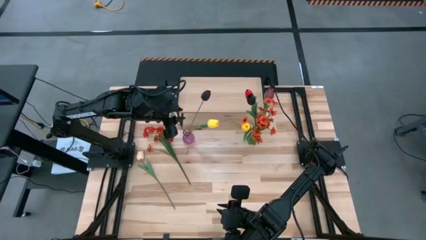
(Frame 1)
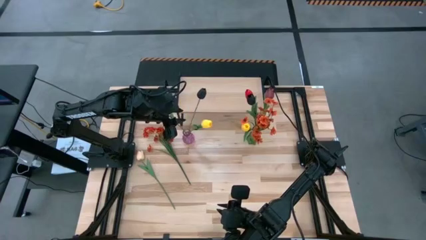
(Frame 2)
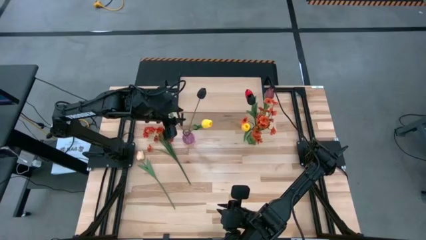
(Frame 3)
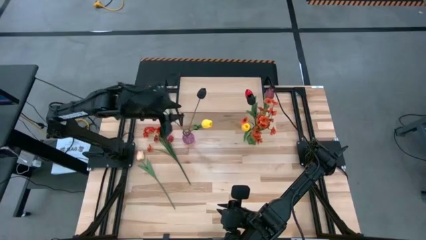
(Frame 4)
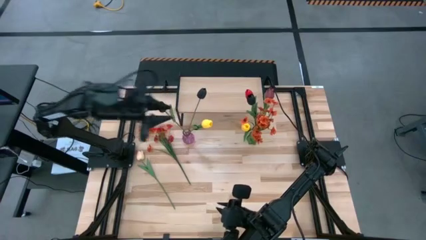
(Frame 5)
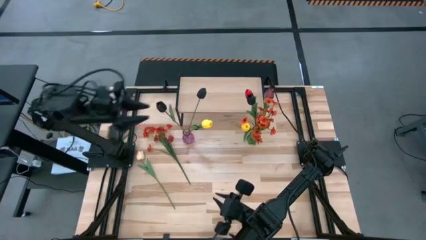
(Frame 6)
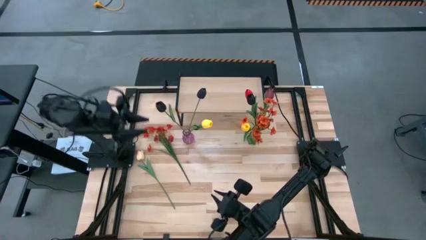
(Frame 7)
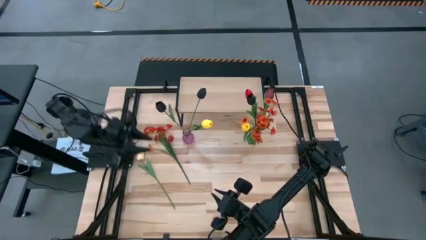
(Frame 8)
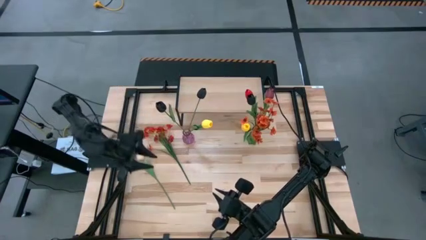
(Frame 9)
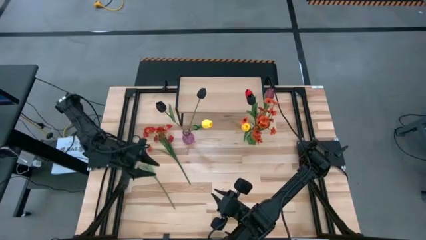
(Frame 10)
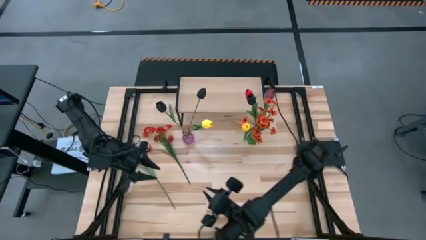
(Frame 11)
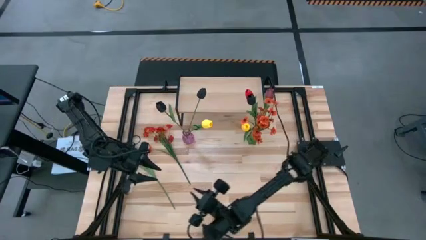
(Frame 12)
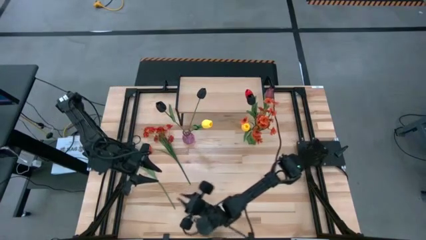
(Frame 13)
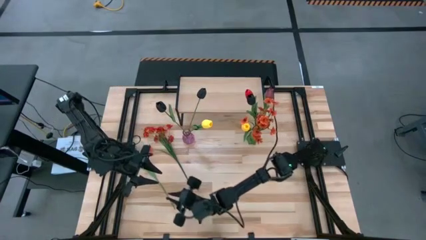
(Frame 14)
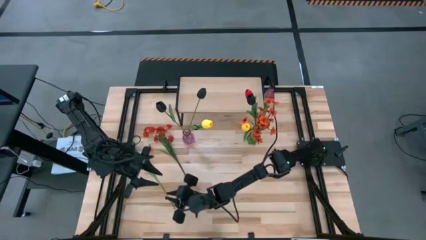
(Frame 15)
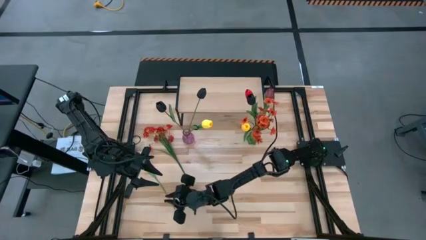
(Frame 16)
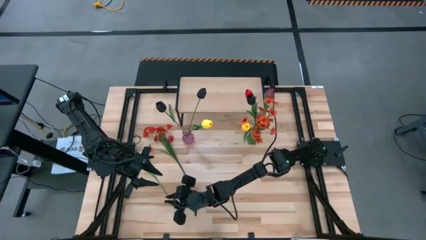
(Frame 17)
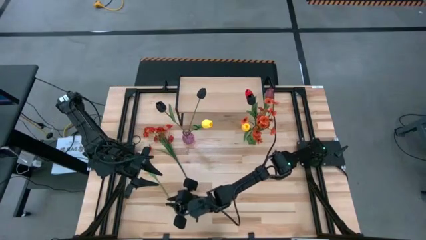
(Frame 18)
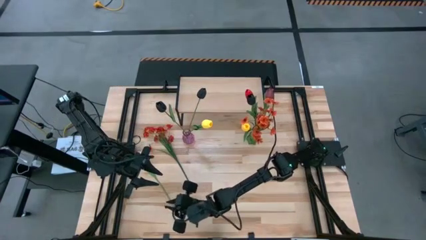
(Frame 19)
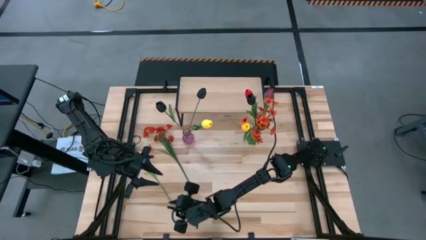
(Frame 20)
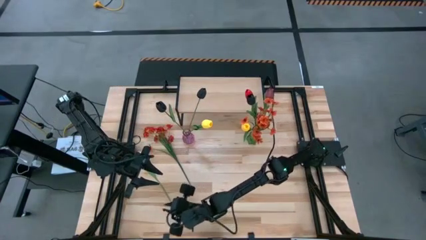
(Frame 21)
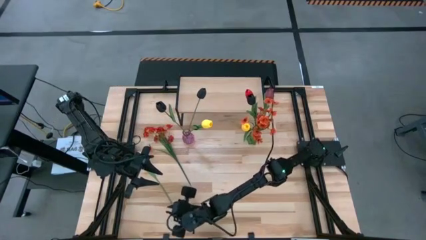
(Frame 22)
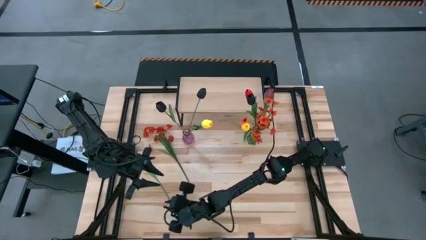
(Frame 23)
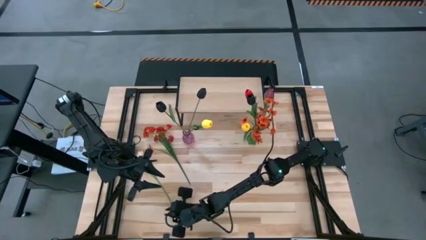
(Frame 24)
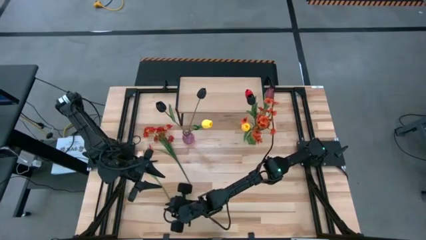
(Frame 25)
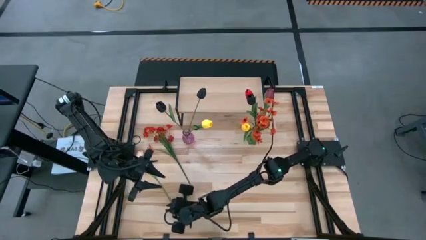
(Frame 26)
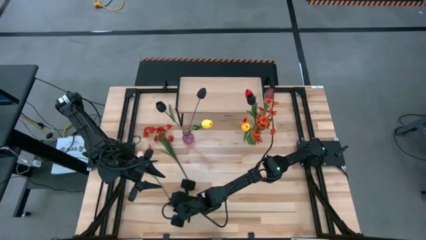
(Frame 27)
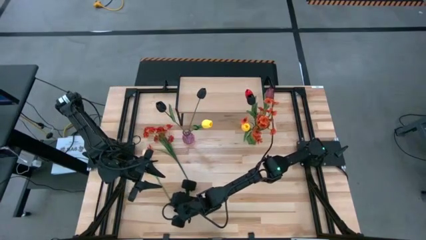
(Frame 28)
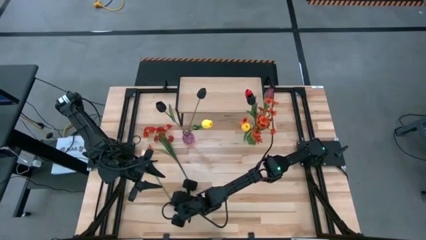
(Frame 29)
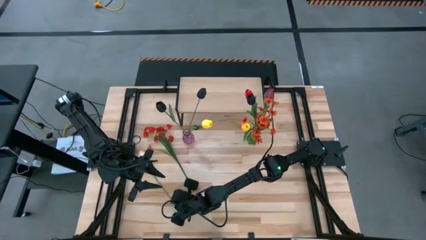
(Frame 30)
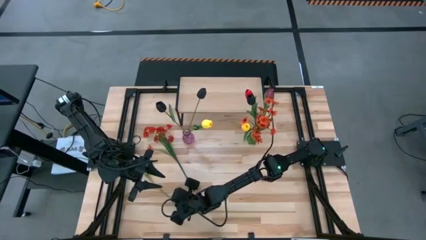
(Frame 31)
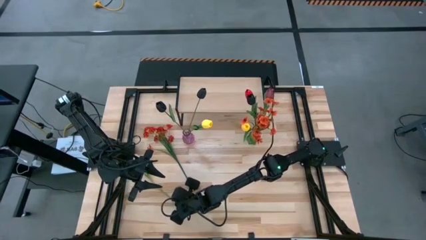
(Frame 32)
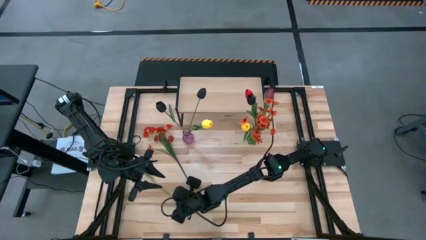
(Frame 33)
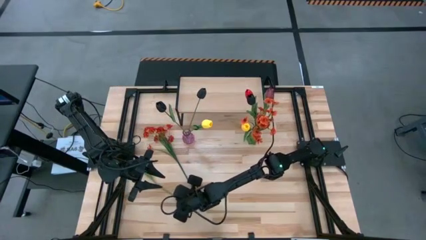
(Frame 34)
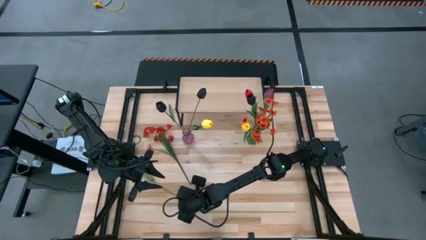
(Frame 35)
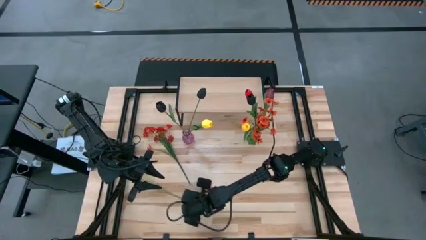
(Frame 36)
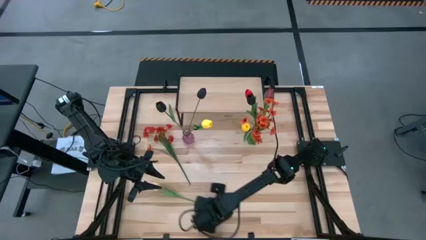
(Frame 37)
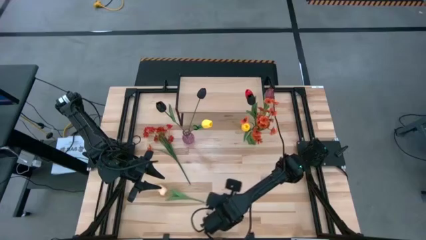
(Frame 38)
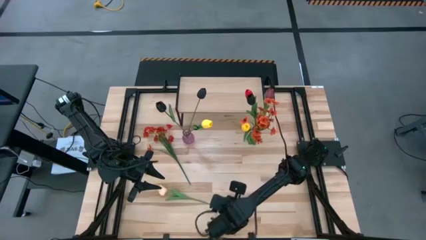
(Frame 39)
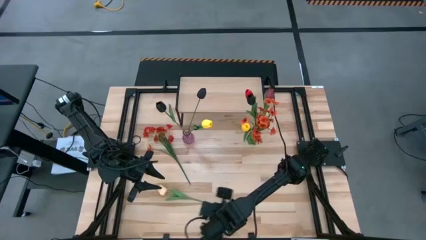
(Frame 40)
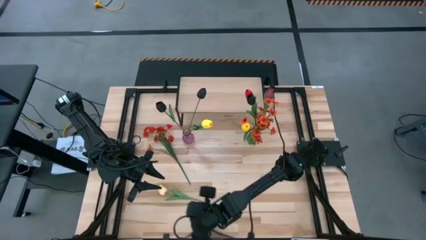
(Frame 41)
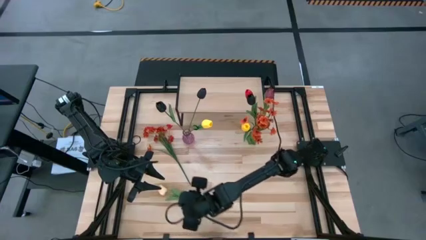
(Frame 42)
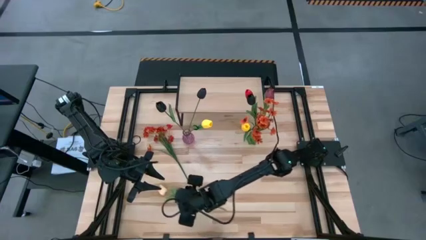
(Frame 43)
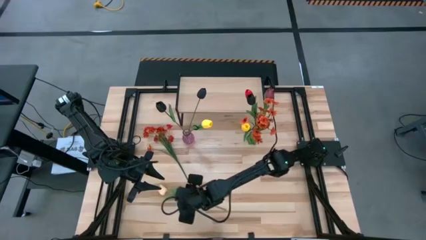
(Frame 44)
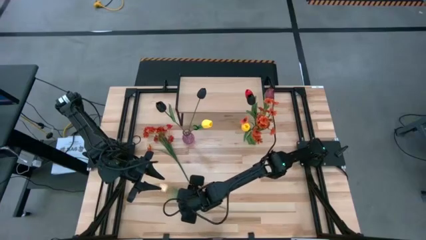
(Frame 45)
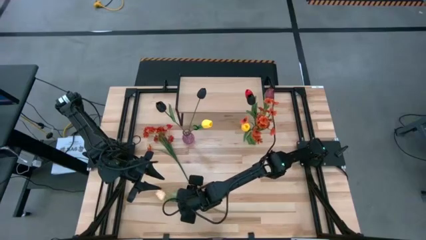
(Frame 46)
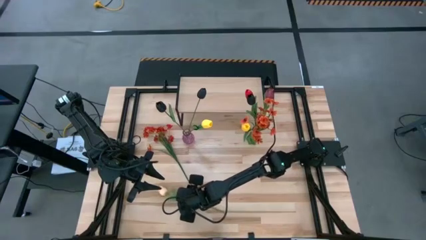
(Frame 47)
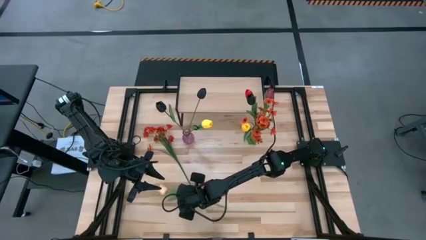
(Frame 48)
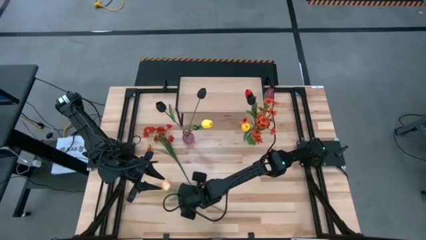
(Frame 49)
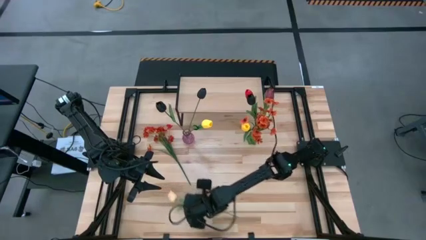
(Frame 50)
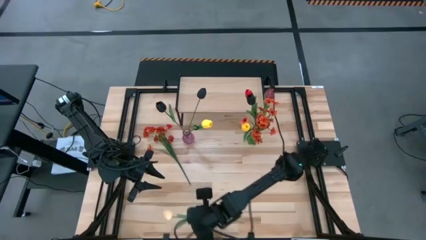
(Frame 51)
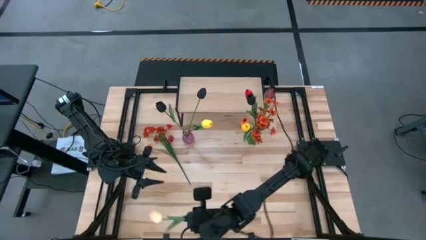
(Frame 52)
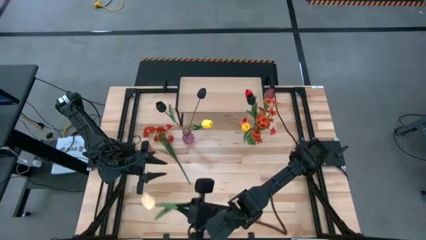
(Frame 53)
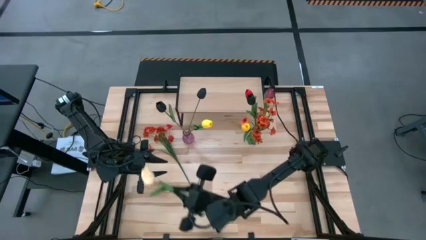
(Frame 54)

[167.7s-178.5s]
Task: Pick and place flowers into a vace then onto a shelf
Put the light orange tulip into the purple vase

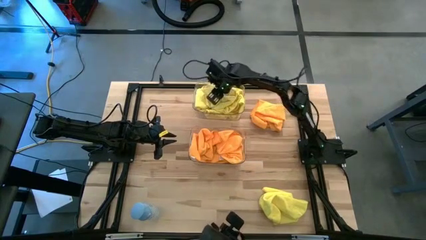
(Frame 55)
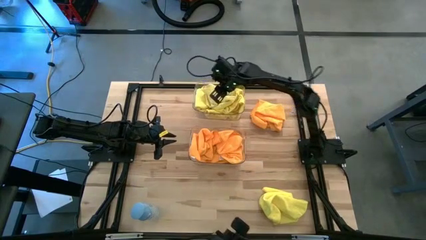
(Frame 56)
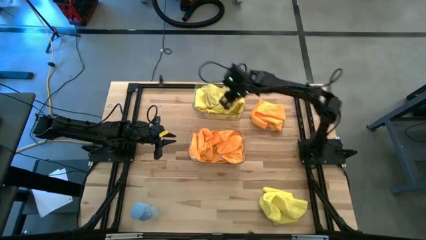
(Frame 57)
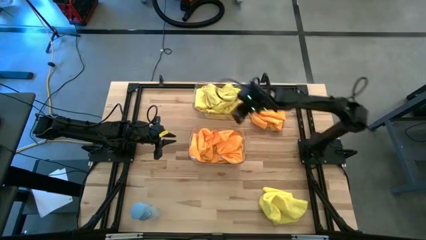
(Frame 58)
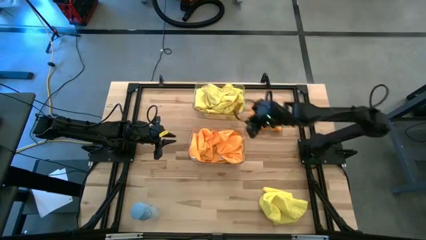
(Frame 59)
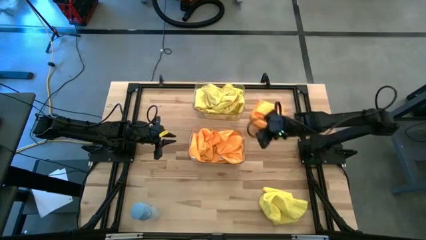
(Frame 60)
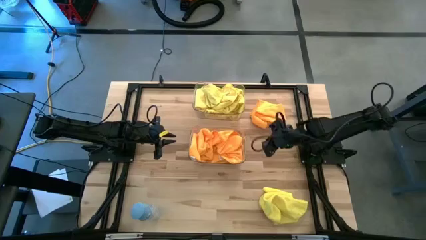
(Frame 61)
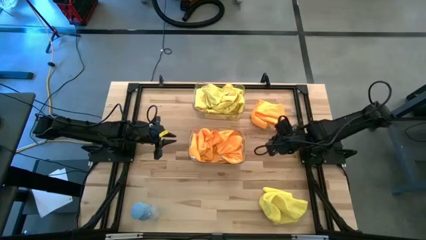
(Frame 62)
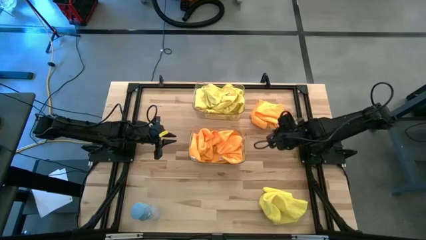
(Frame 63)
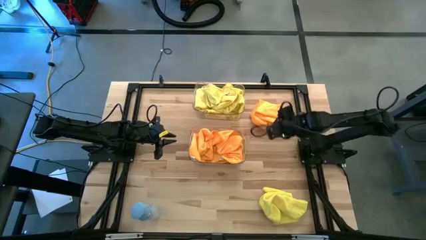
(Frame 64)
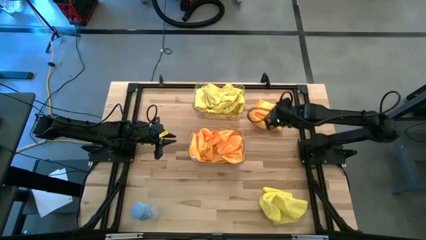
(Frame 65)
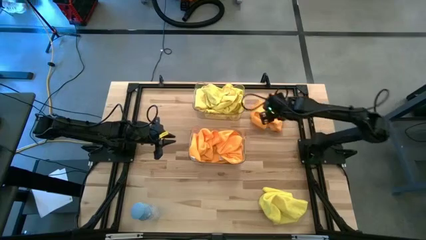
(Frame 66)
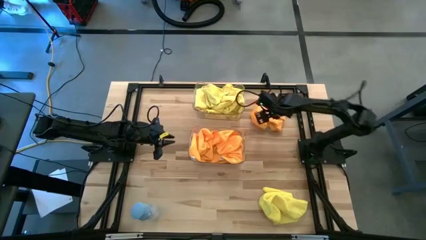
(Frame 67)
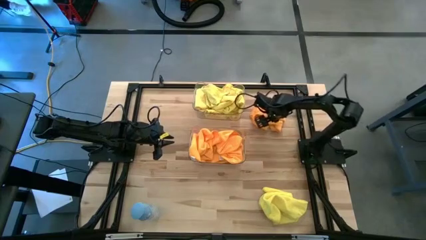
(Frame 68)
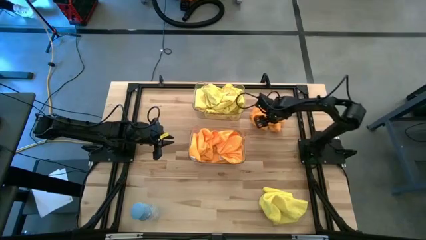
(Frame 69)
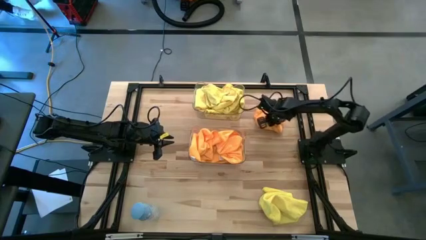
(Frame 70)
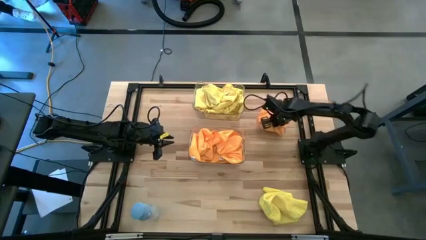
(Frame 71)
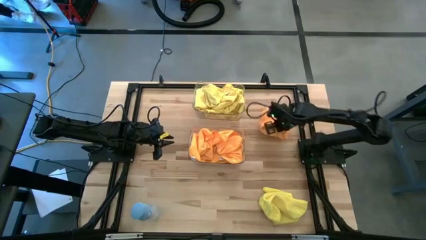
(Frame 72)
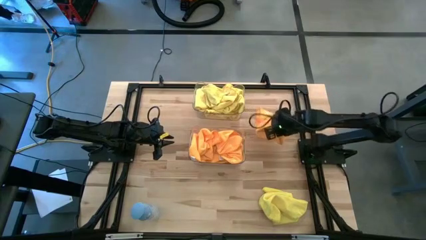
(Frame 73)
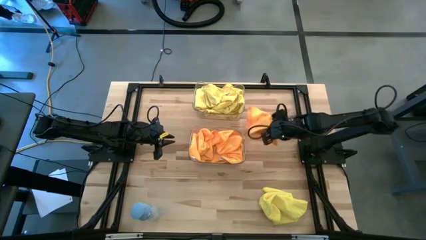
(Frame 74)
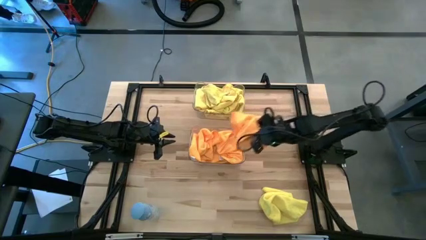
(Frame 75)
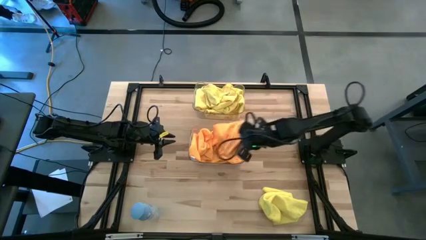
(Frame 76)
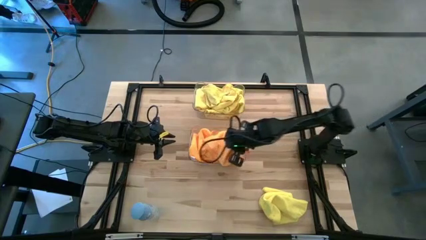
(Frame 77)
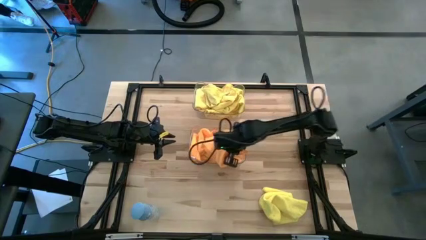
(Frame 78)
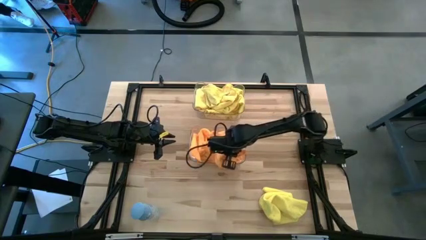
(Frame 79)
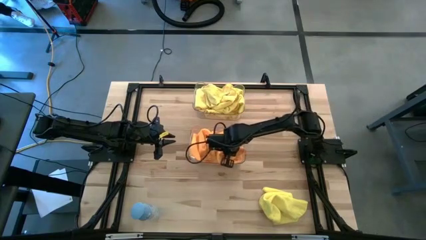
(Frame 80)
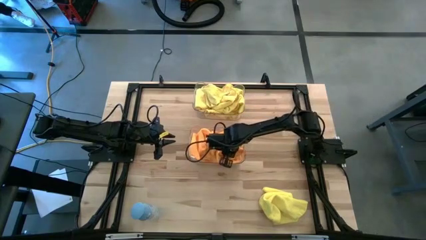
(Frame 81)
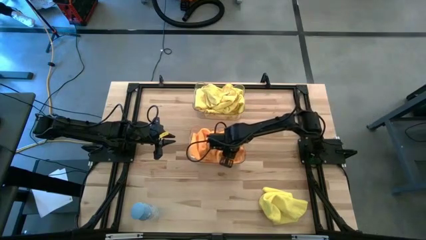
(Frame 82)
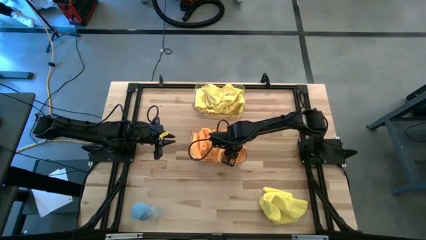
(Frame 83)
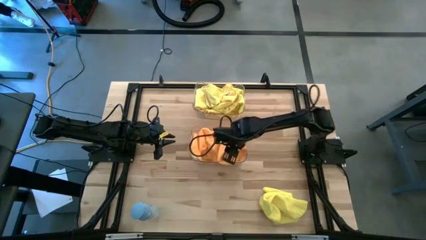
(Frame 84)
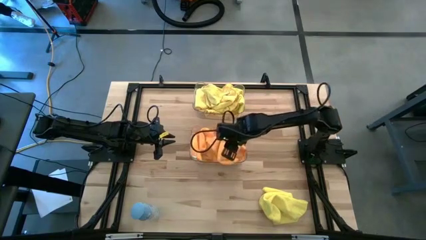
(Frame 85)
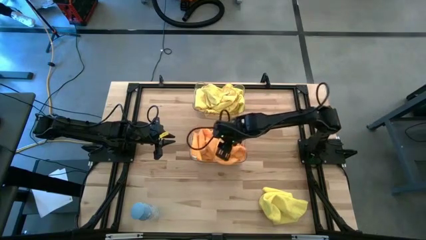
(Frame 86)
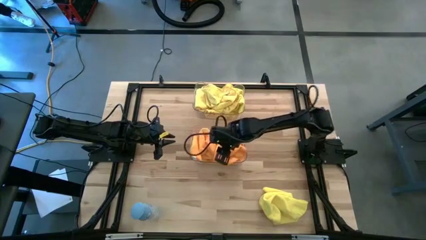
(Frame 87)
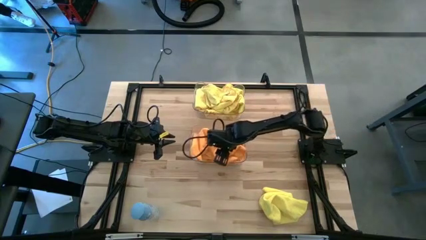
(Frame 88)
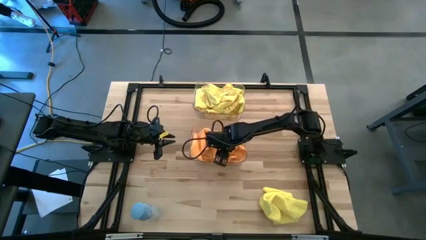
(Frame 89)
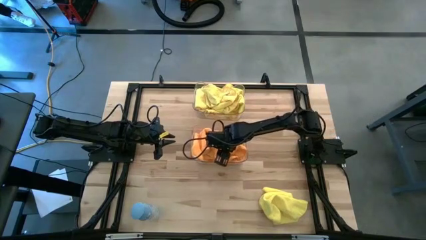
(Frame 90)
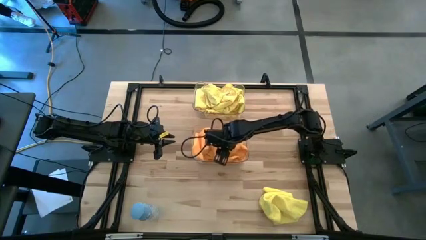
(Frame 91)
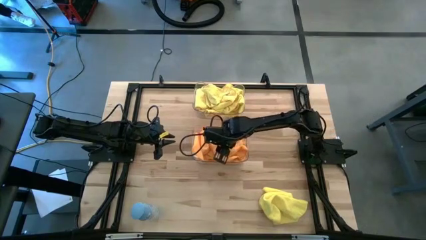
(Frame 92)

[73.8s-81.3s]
Task: Sort microfiber towel by color & place in baskets
Put the orange microfiber towel into the bottom transparent bin
